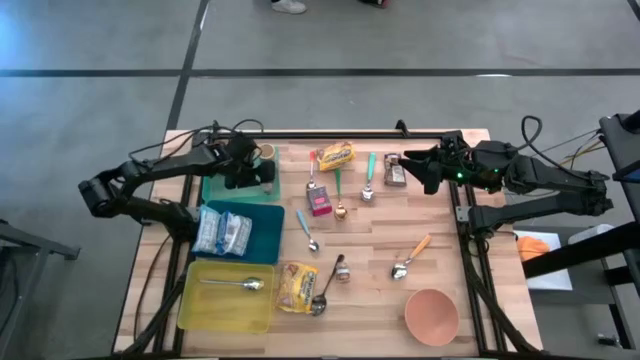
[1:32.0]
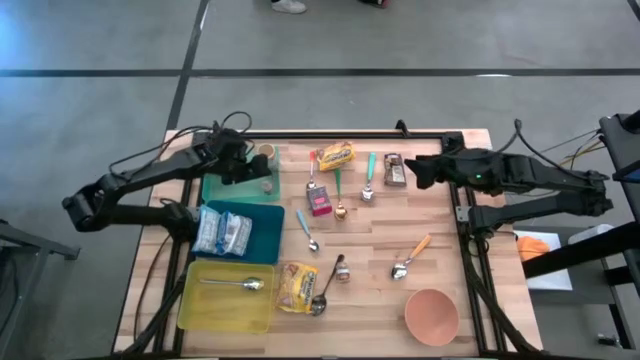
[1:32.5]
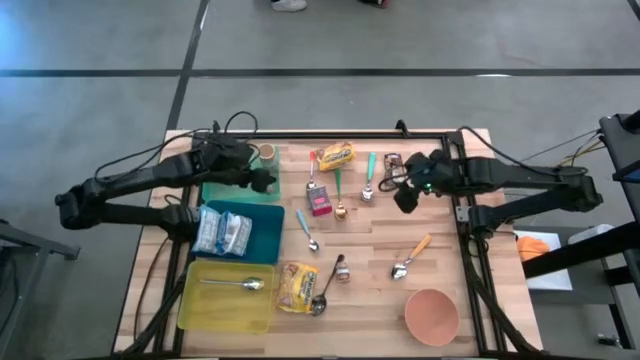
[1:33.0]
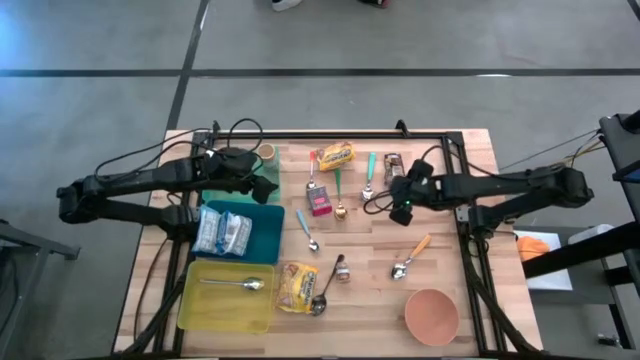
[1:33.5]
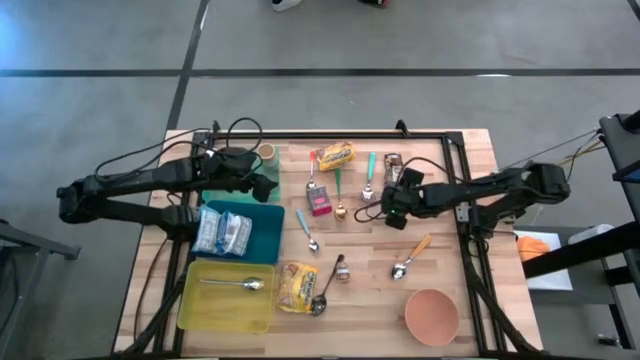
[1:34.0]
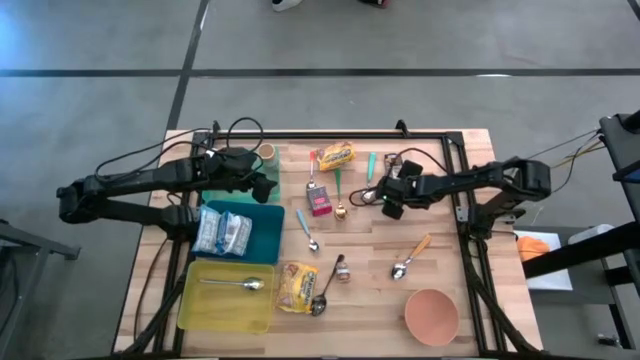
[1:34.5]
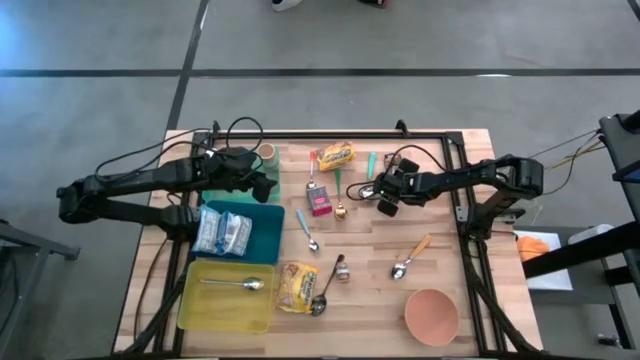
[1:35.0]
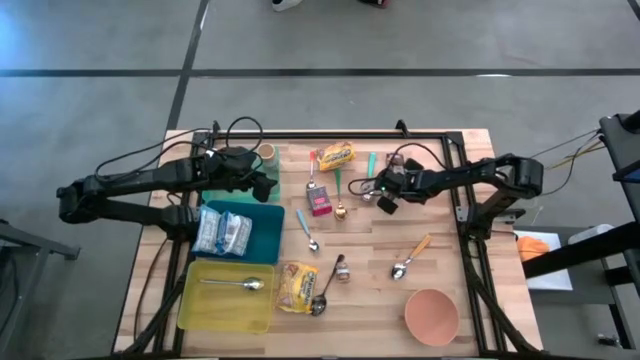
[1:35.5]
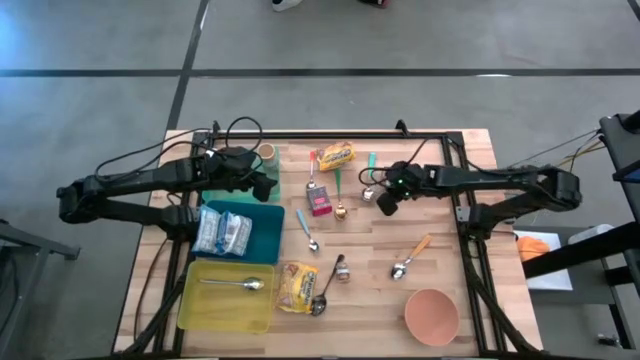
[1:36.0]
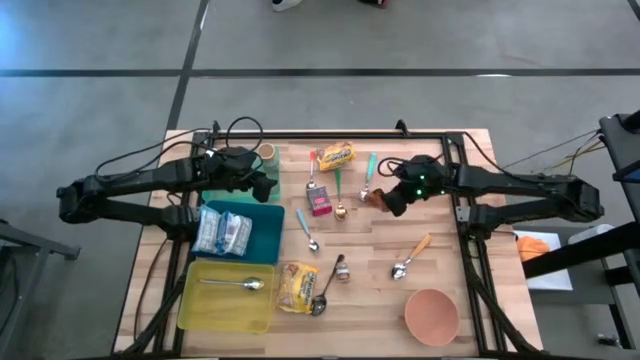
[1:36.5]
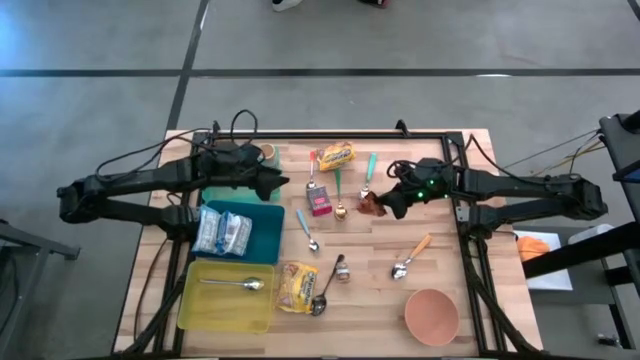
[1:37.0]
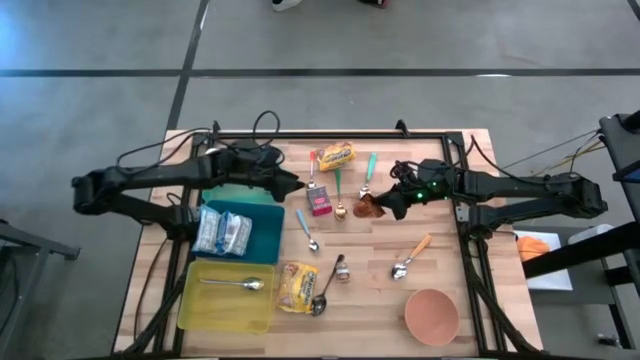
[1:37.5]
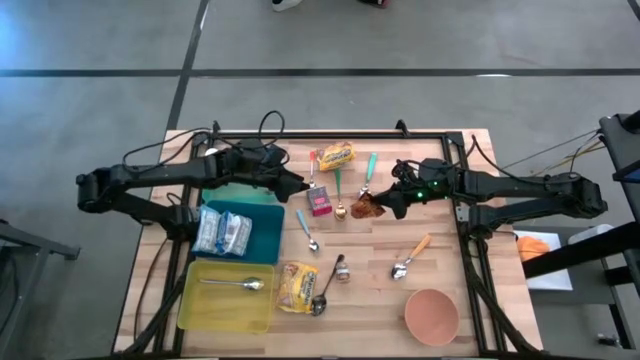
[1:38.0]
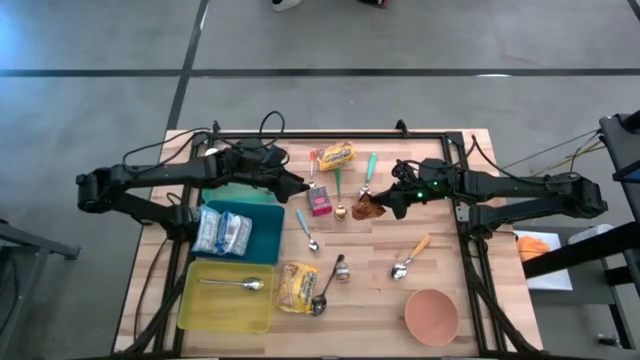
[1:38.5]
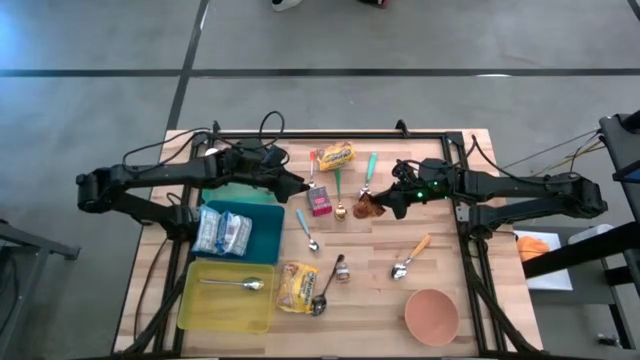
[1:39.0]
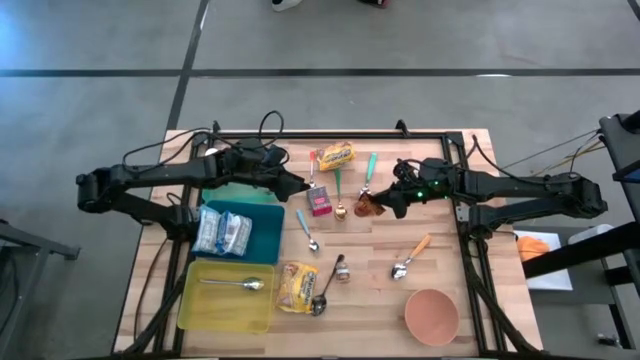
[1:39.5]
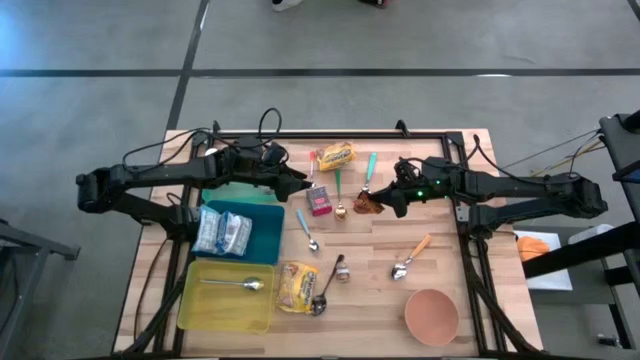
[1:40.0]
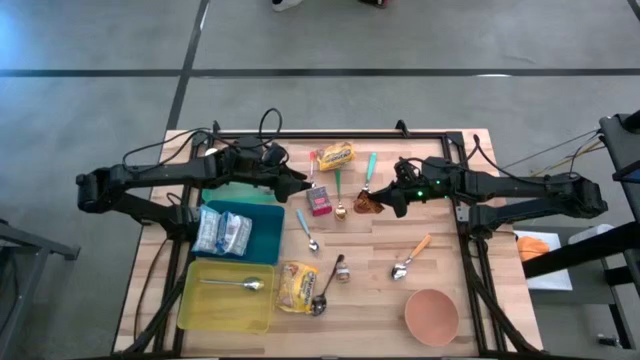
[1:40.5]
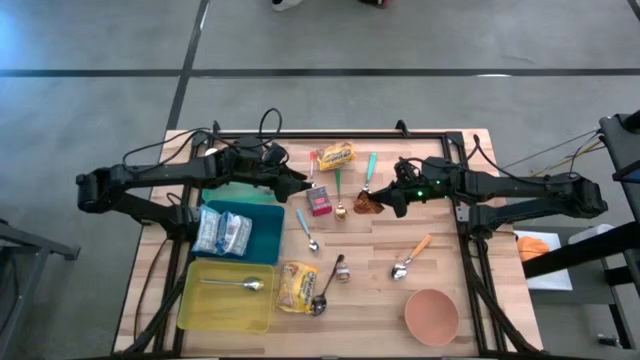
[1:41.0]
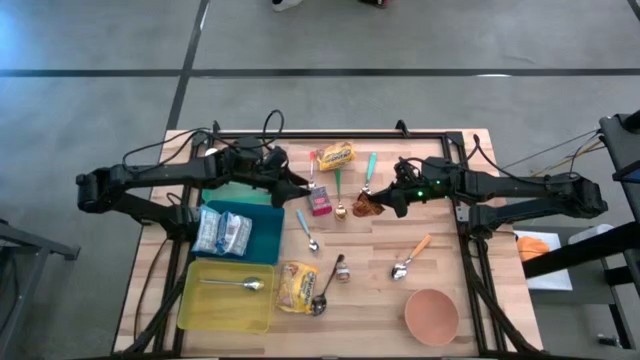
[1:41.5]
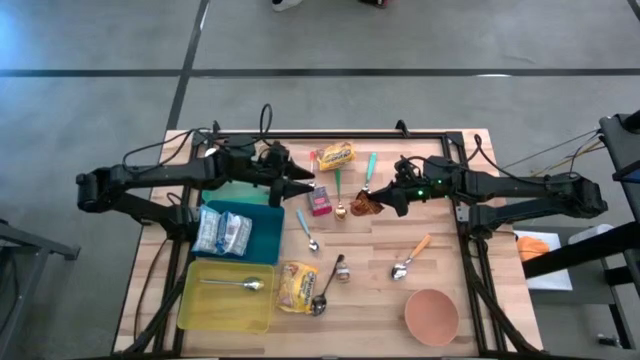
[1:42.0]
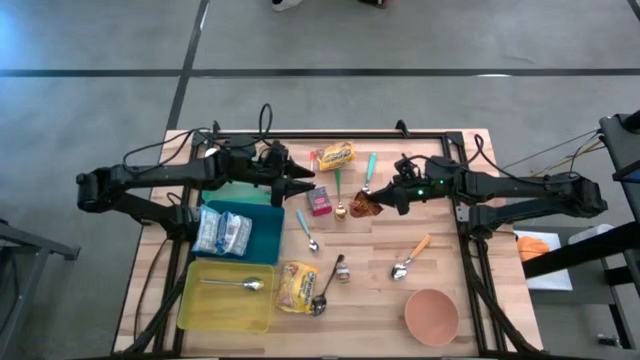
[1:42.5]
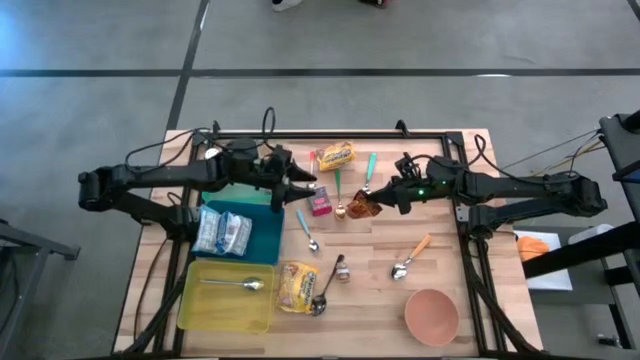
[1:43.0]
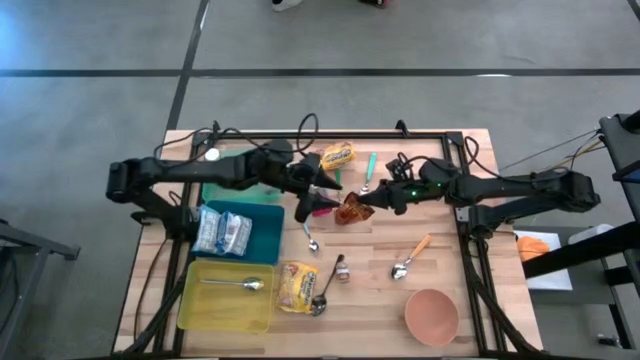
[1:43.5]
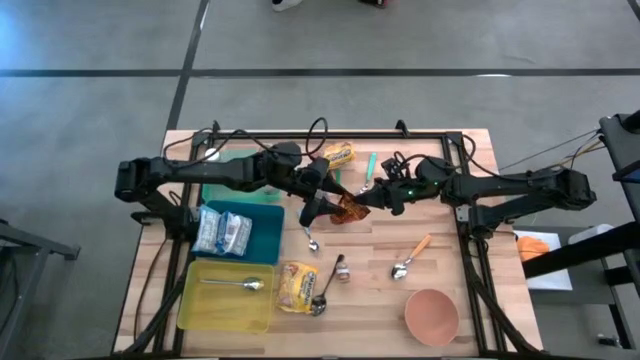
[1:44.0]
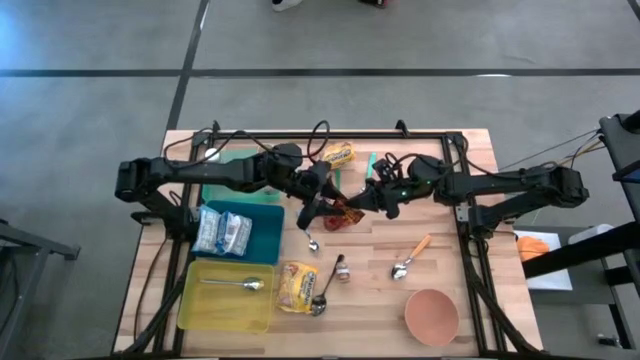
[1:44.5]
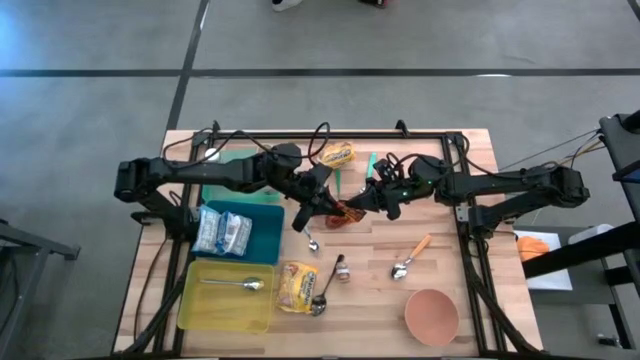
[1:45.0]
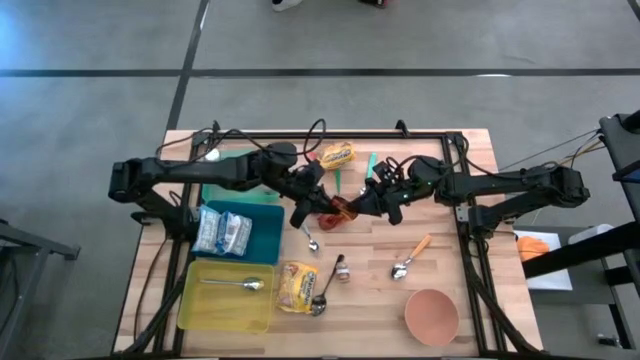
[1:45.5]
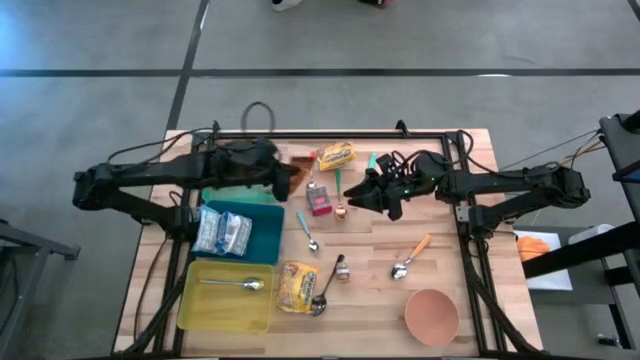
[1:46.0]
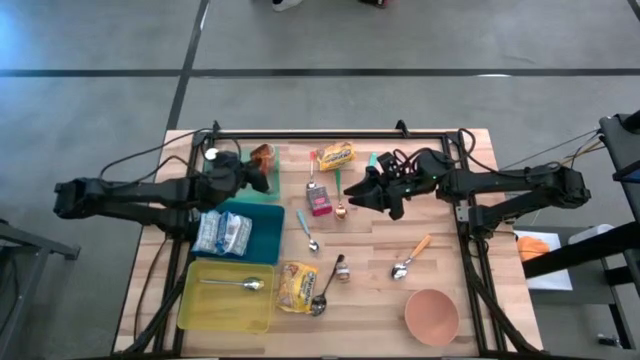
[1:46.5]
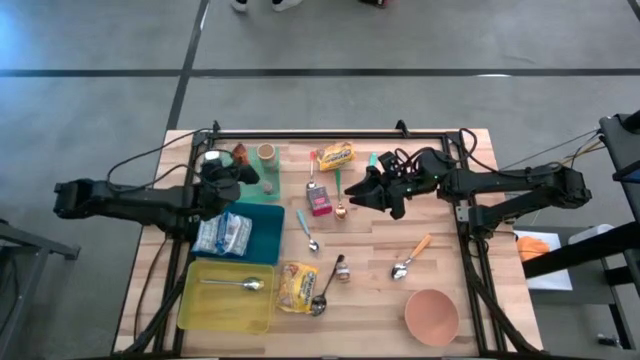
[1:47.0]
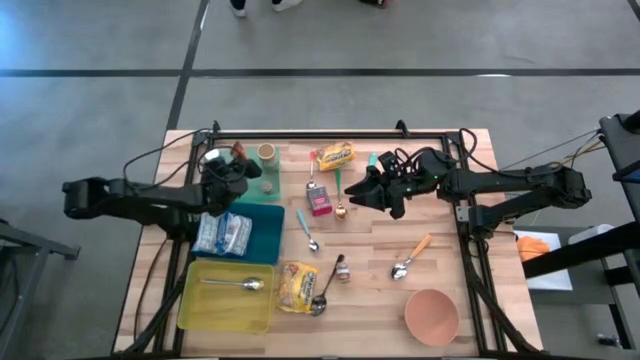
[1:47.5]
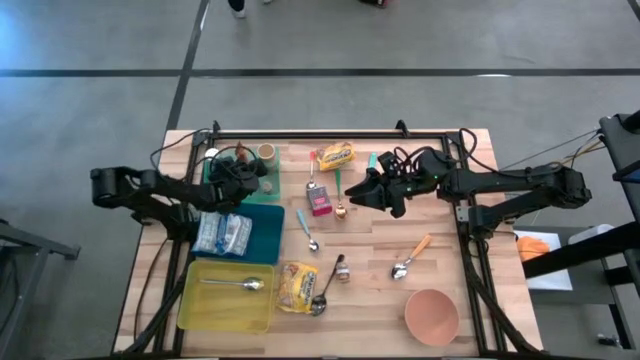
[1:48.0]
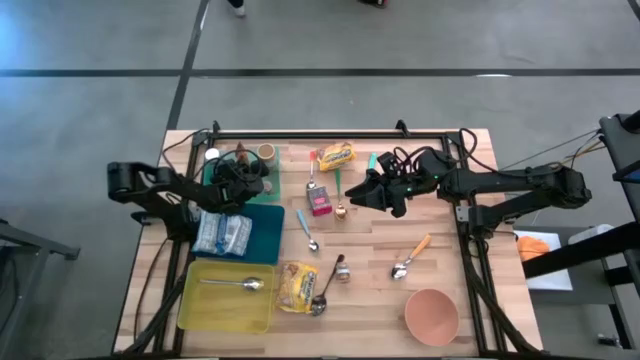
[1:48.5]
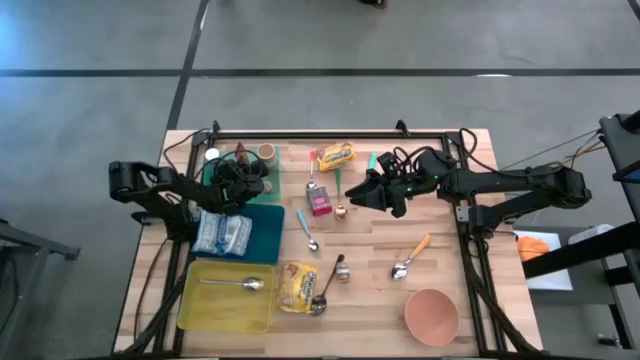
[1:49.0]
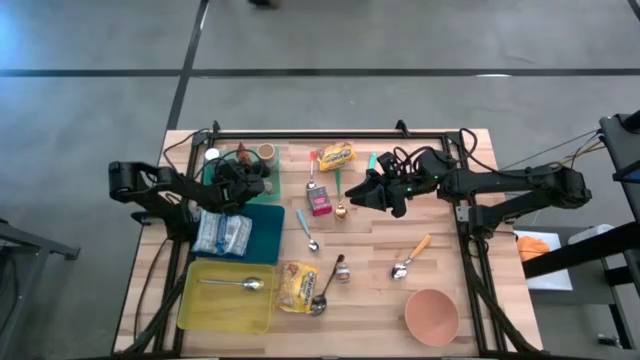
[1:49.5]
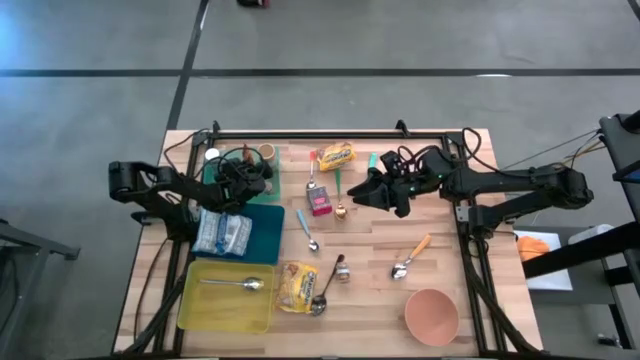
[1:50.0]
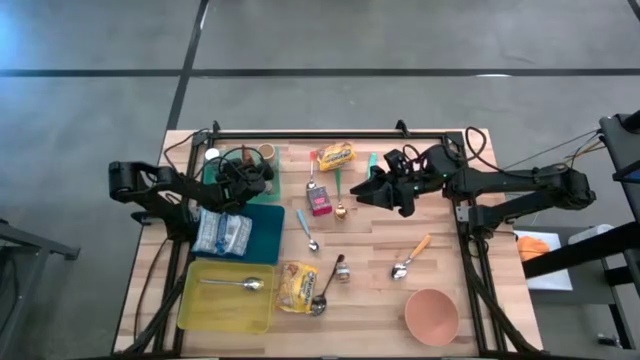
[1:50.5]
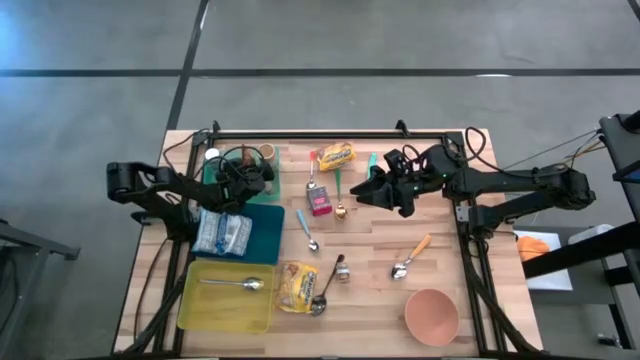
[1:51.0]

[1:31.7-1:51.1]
Put the orange seasoning bag into the light blue bin
